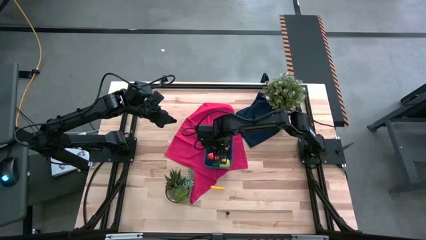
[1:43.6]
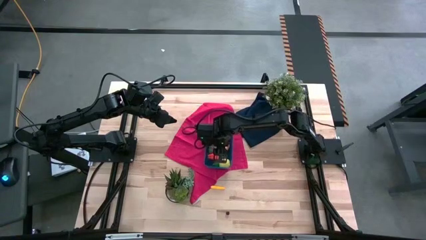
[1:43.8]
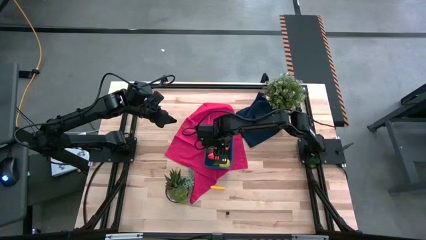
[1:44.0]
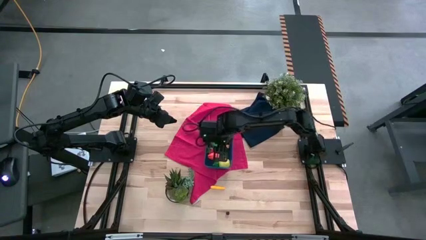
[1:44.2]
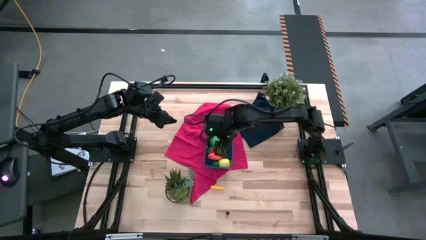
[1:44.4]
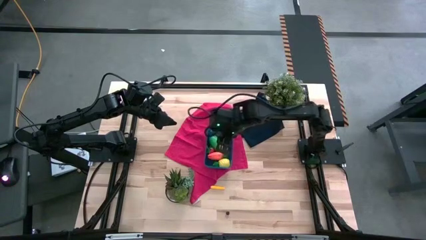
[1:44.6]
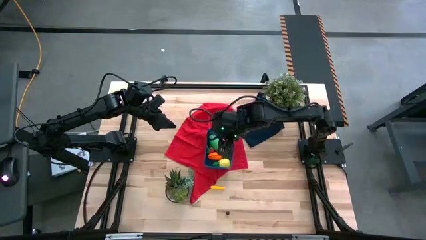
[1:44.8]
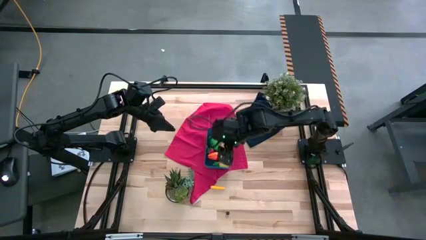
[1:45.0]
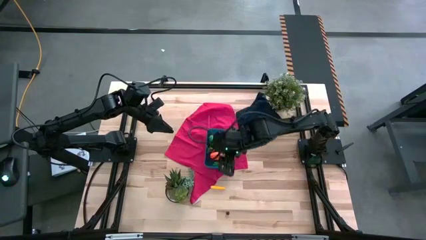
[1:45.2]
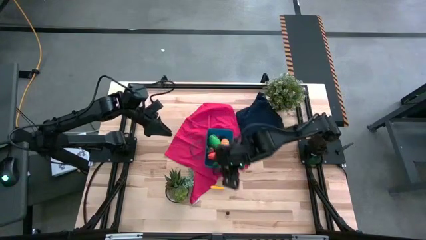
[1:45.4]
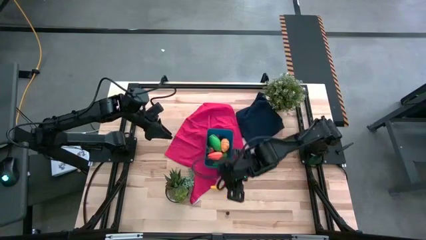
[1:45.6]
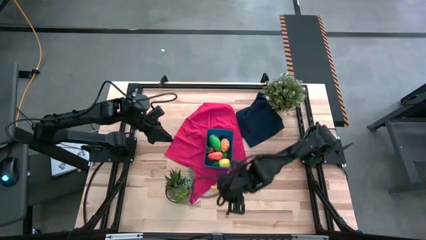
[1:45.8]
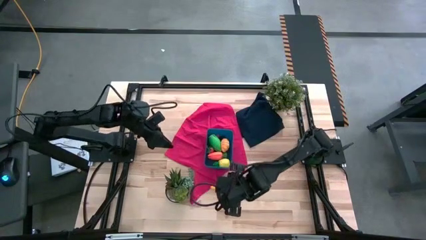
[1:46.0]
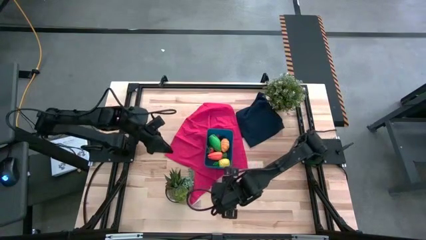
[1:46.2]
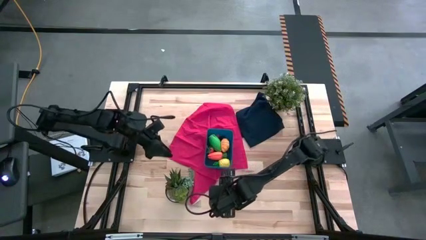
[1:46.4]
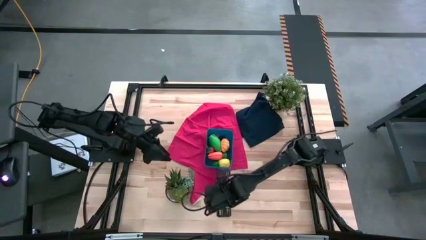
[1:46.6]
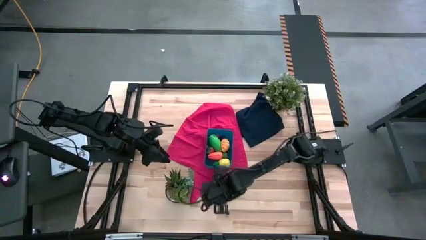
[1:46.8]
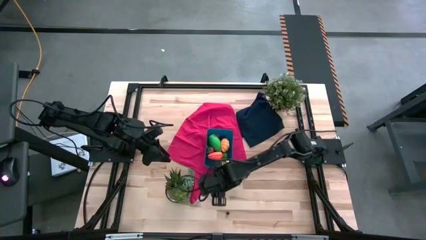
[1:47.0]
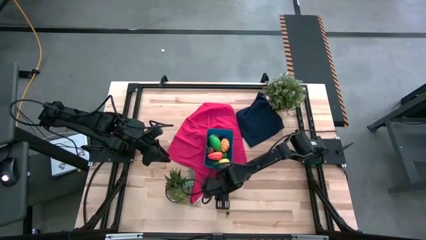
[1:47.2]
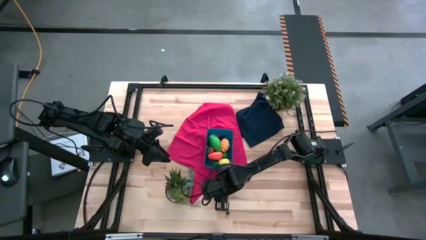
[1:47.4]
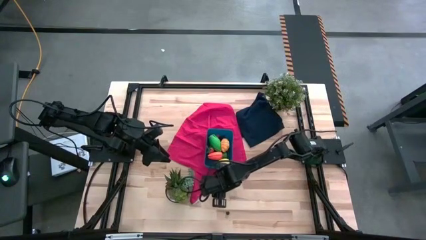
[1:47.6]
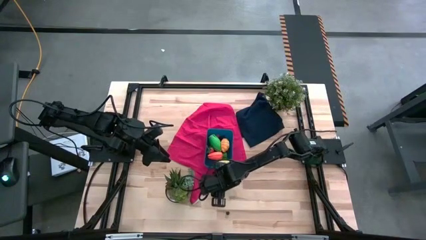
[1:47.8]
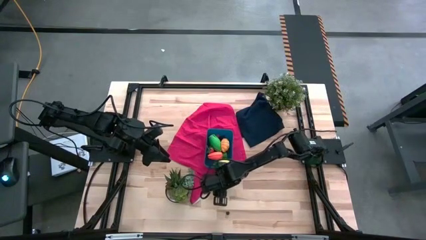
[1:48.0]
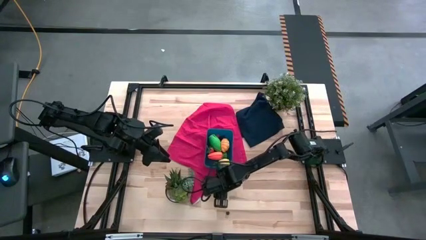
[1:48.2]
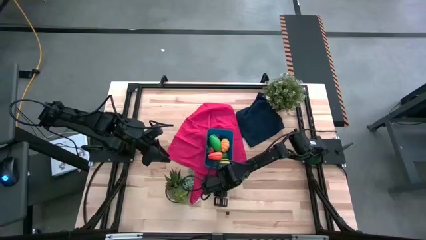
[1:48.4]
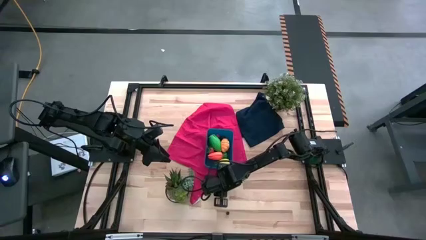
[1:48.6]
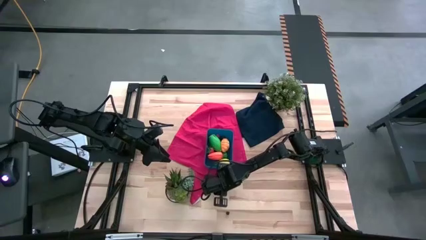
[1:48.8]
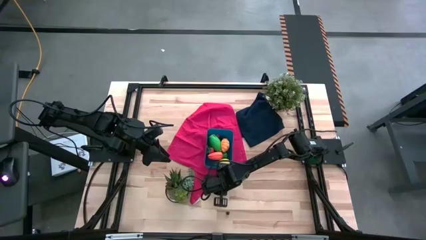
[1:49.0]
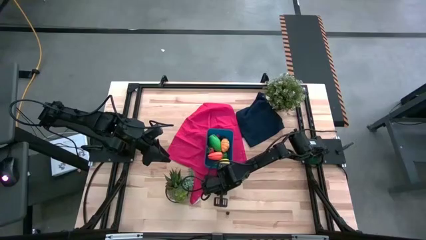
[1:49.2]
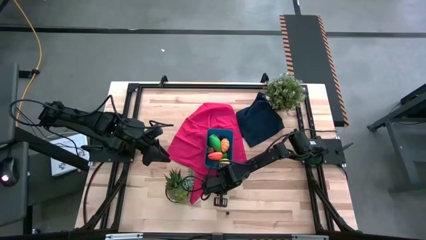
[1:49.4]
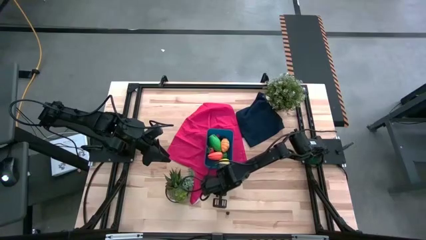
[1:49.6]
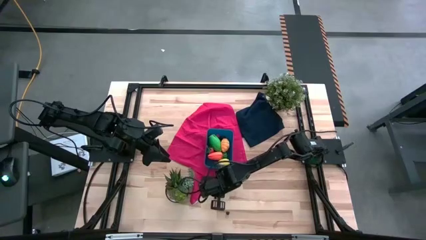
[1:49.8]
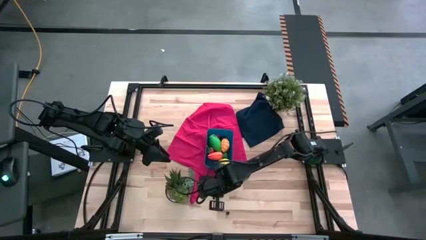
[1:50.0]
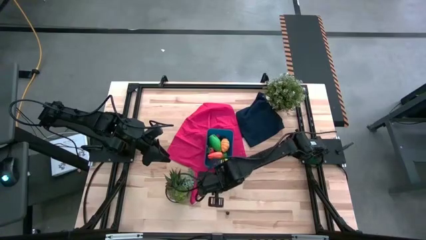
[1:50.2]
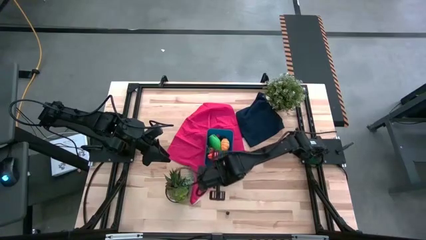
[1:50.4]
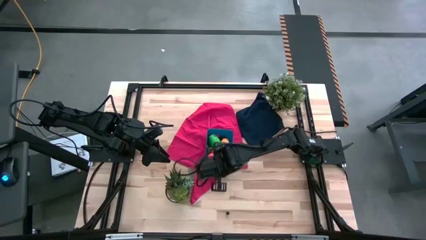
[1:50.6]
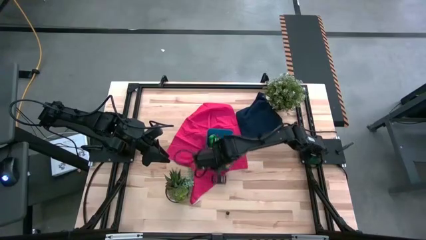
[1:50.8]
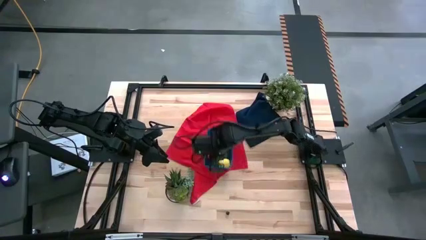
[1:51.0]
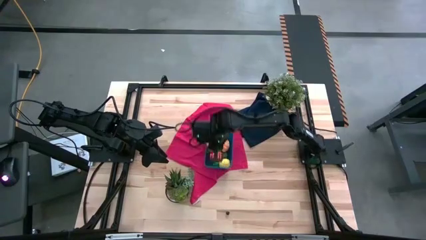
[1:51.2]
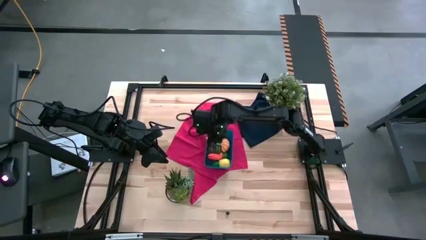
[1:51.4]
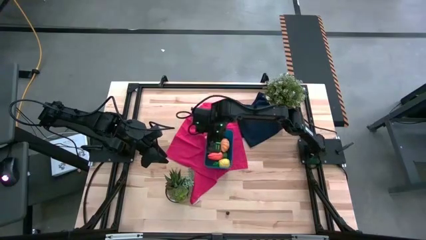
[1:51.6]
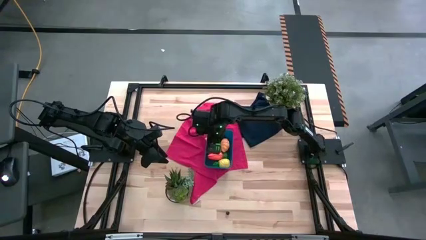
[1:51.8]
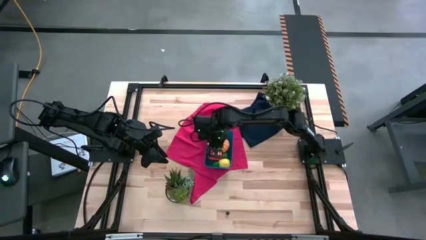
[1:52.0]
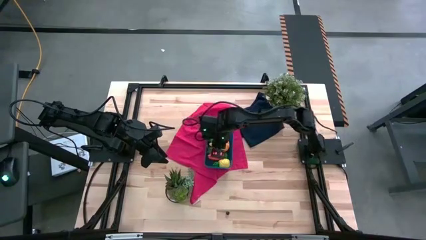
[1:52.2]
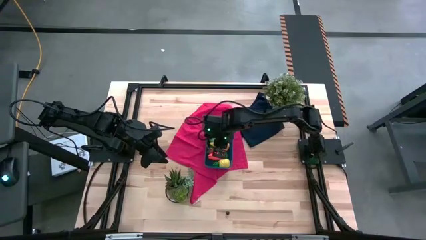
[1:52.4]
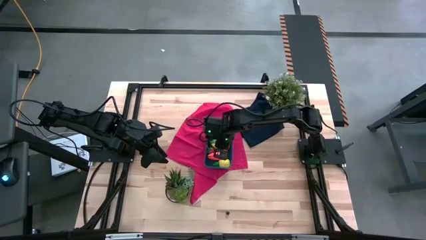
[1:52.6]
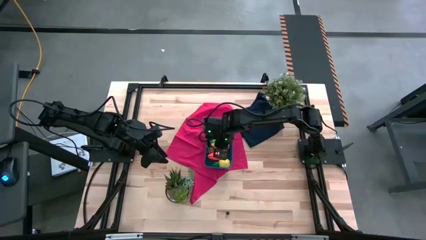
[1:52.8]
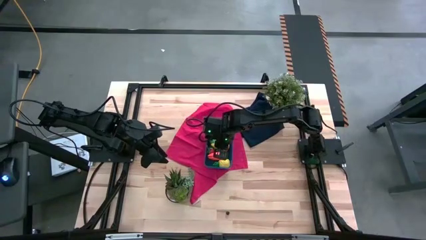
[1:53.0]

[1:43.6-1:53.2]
Task: Pick and placing Produce into tupperware
Put the corn into the blue bin

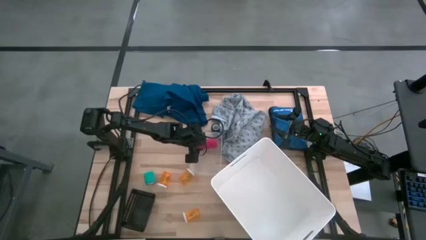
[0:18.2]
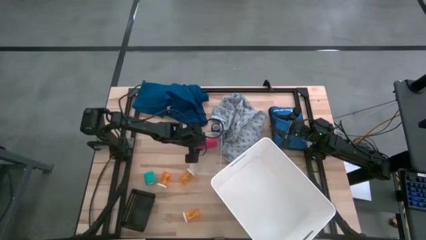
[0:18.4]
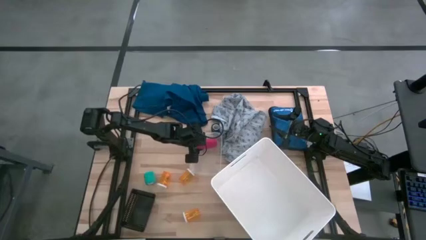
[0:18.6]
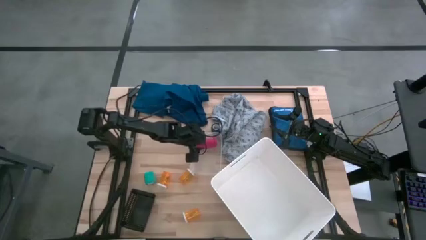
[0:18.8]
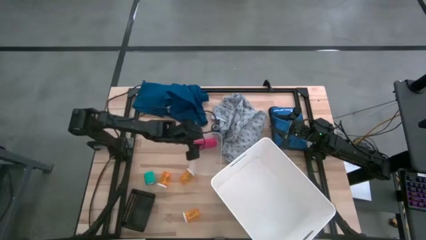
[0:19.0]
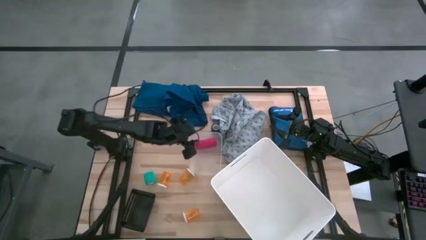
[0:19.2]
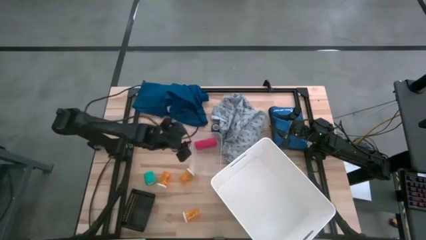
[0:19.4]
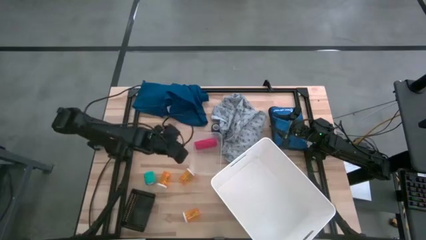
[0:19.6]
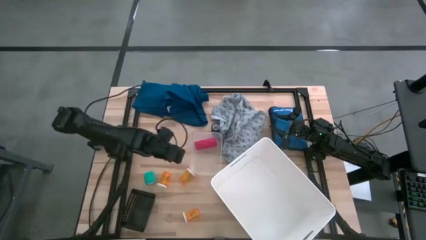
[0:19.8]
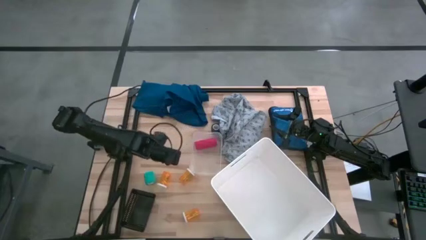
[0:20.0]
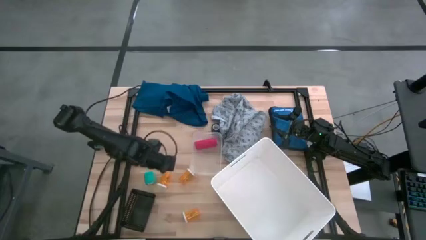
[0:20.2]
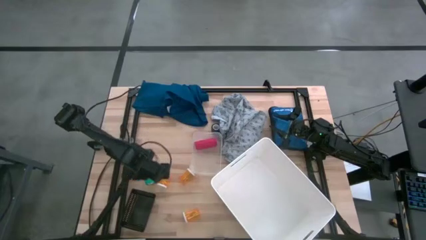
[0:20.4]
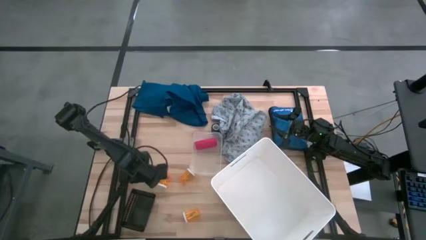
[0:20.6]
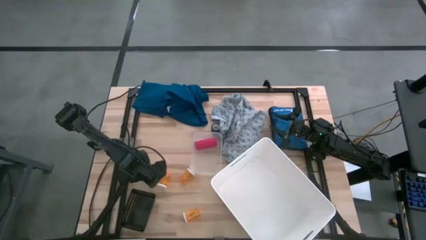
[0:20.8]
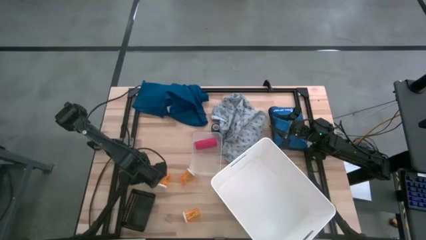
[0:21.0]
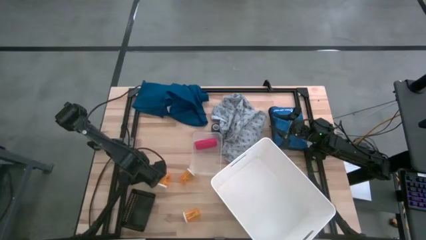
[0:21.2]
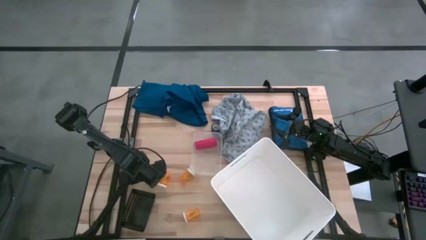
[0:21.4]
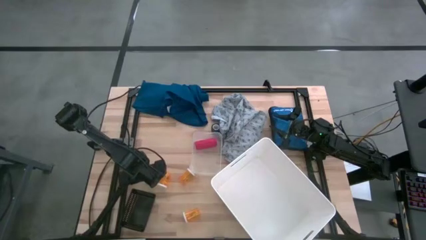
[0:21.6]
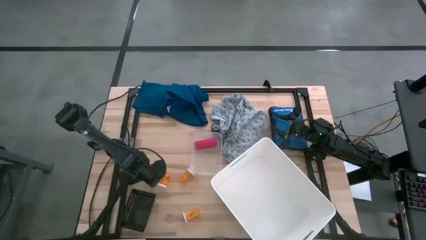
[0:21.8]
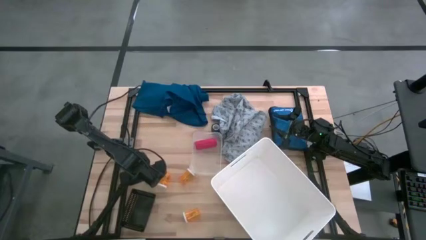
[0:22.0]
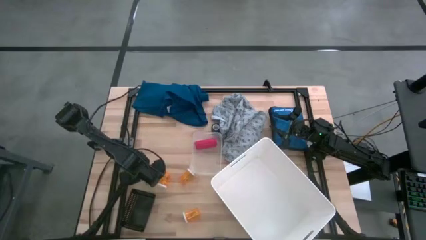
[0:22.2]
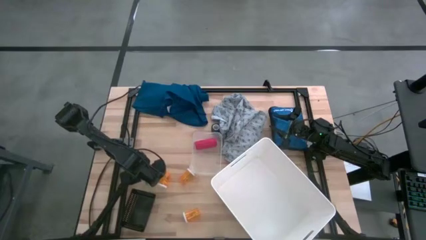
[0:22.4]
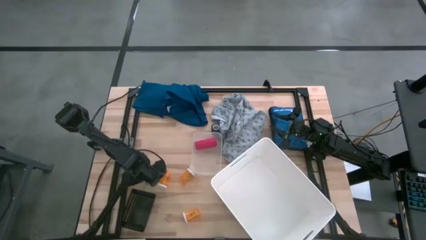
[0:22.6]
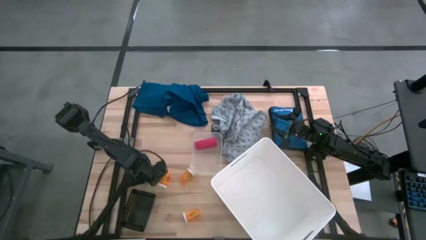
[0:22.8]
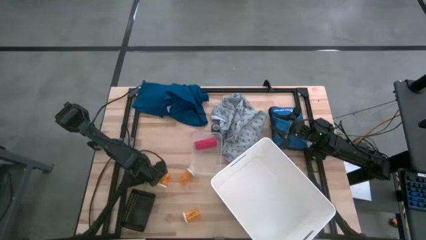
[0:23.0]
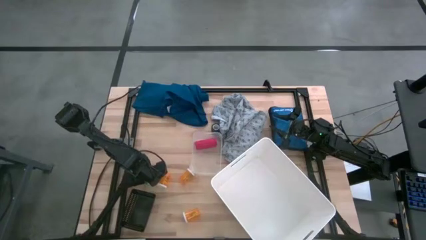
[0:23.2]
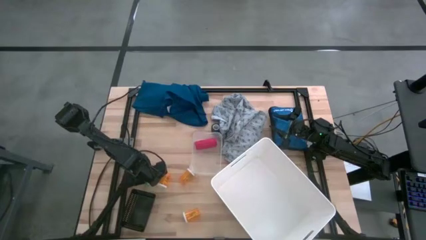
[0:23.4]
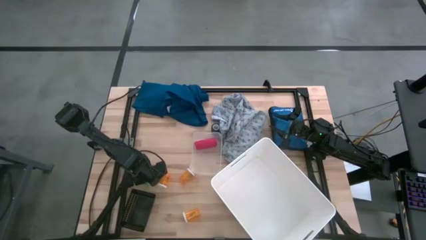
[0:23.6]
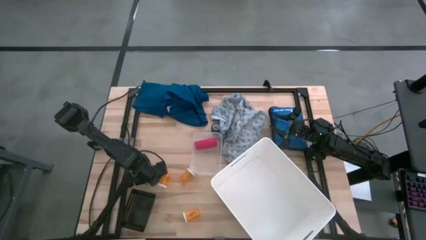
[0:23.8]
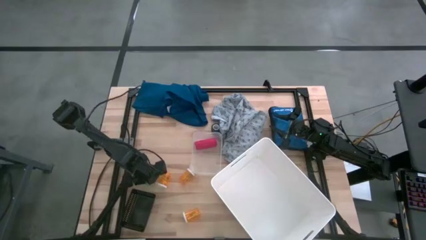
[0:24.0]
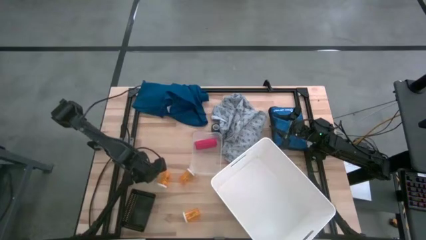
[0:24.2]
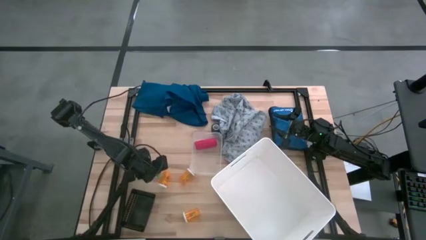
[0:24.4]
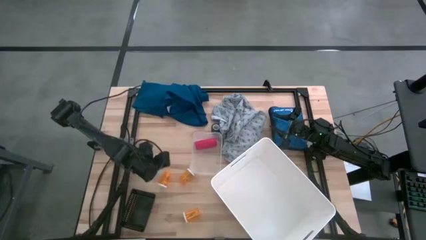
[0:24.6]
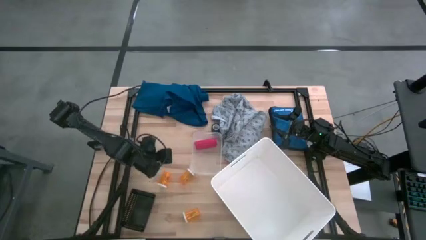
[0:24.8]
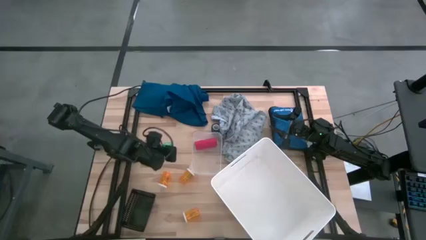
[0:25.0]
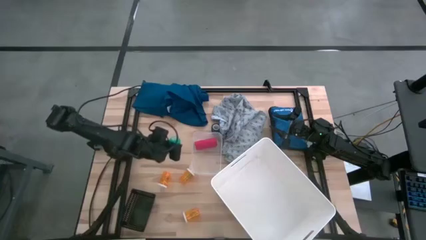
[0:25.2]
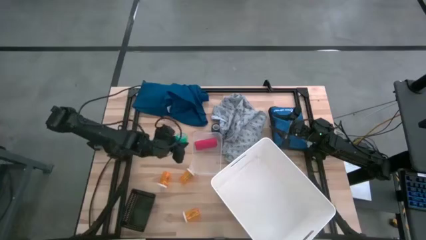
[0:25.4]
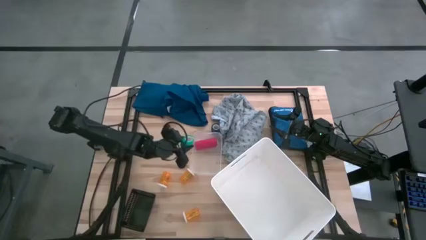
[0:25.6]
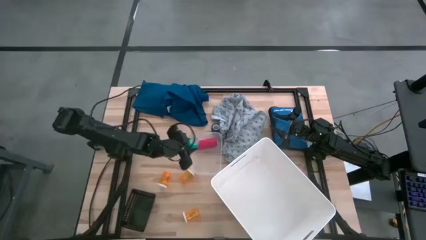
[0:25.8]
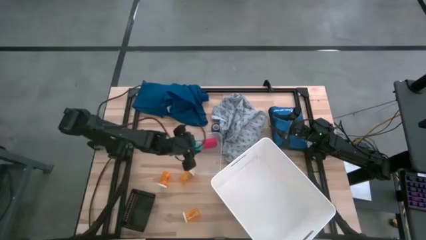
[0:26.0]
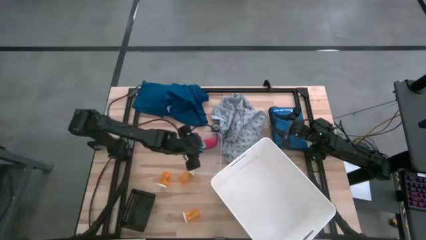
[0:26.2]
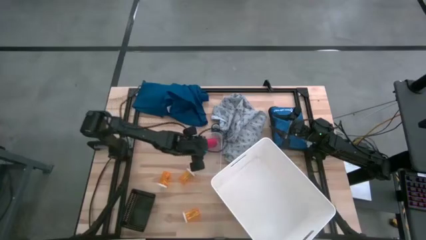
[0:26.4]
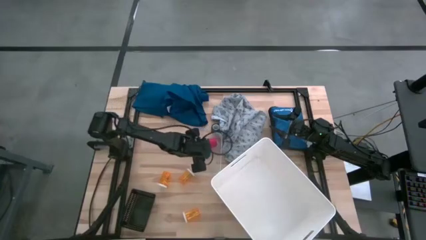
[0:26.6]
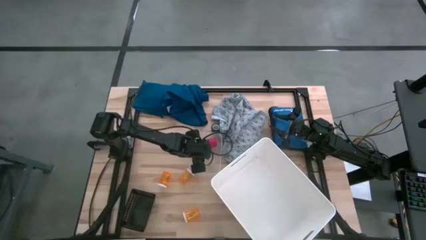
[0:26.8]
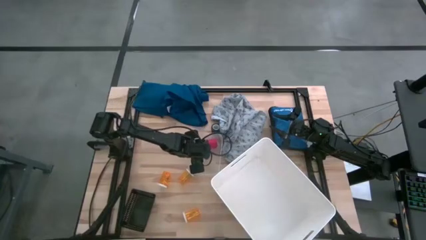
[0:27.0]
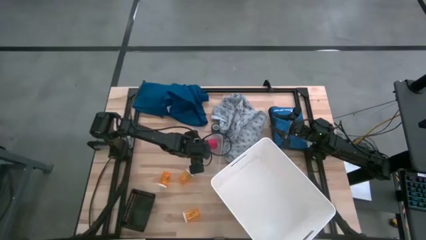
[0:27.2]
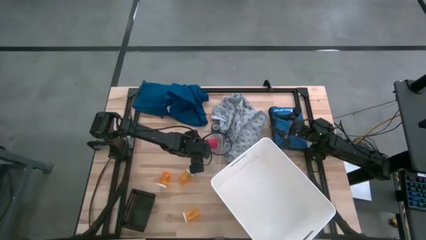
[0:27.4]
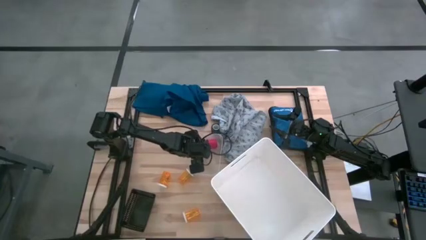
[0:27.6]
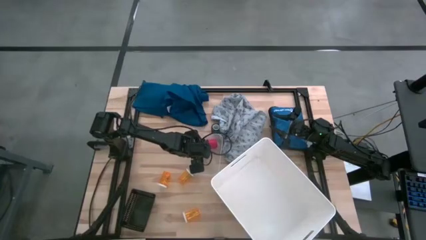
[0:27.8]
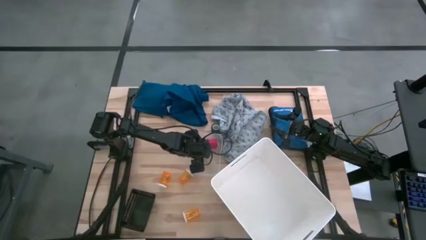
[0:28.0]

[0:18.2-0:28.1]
Task: Pick & Place Medicine items
Put the light green bandage into the transparent bin
